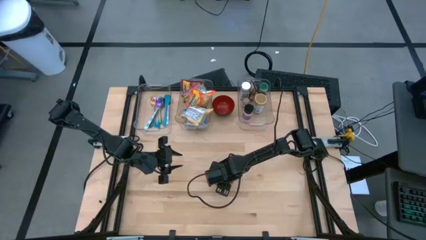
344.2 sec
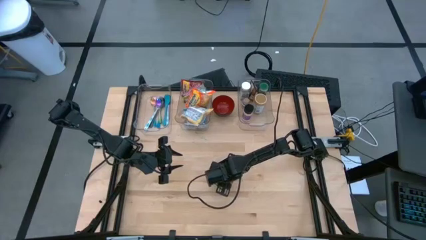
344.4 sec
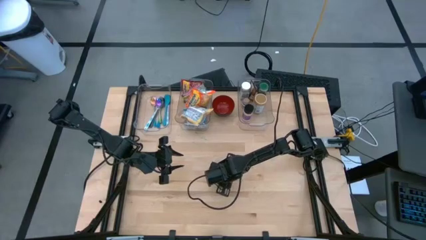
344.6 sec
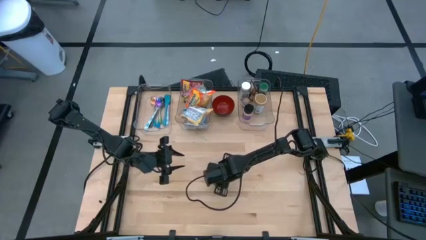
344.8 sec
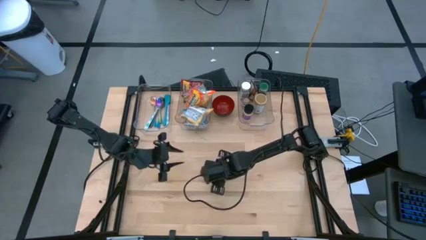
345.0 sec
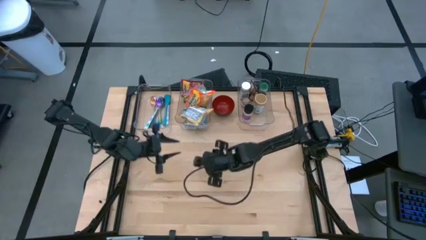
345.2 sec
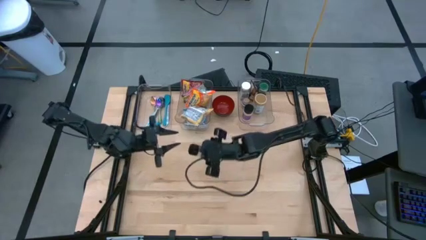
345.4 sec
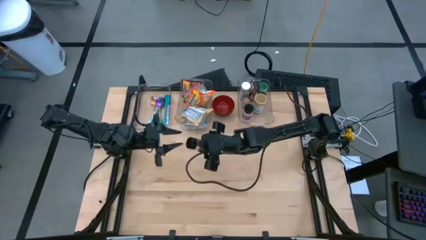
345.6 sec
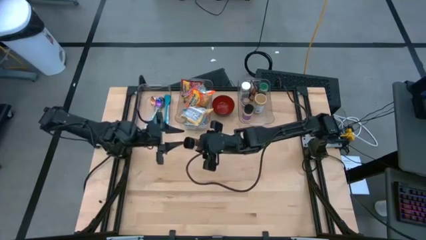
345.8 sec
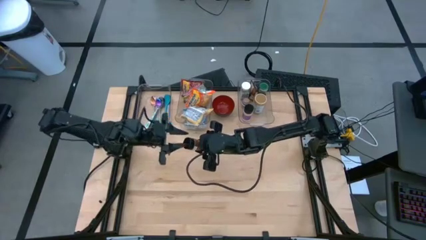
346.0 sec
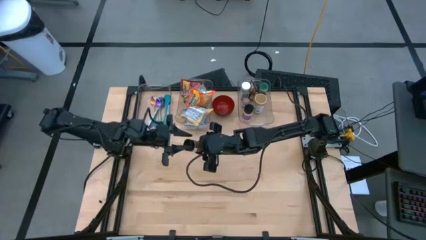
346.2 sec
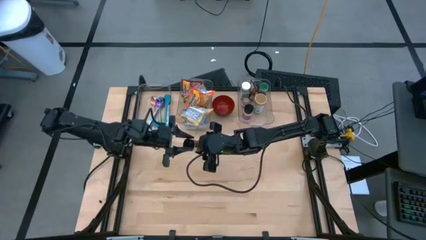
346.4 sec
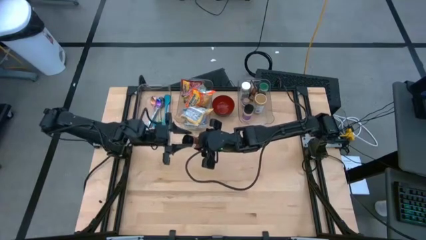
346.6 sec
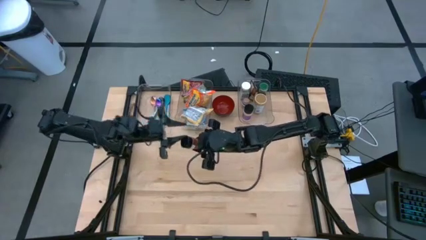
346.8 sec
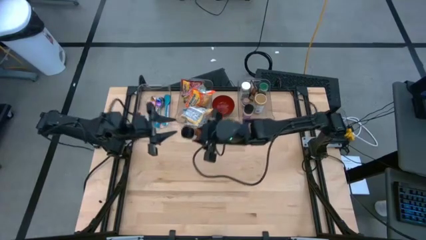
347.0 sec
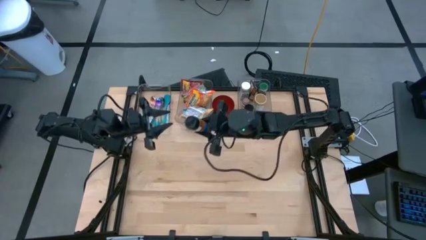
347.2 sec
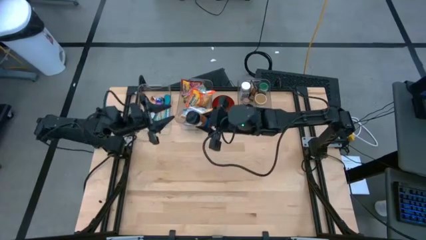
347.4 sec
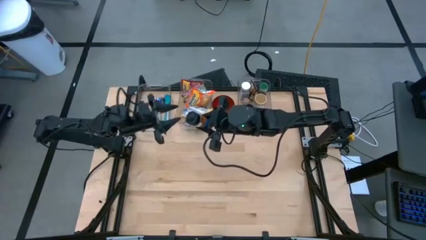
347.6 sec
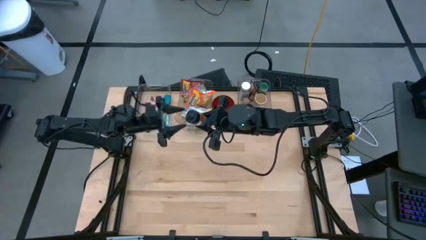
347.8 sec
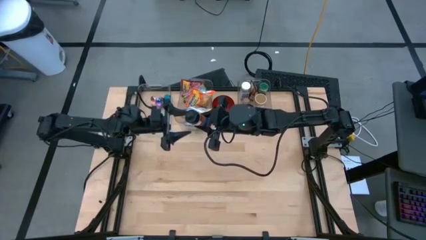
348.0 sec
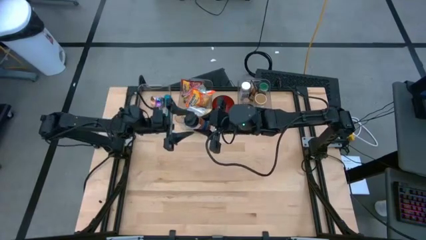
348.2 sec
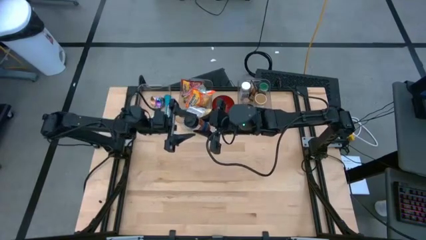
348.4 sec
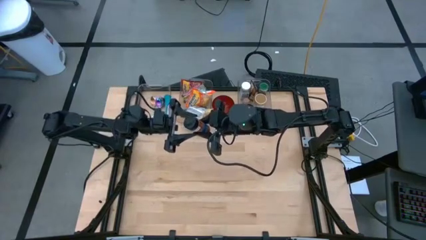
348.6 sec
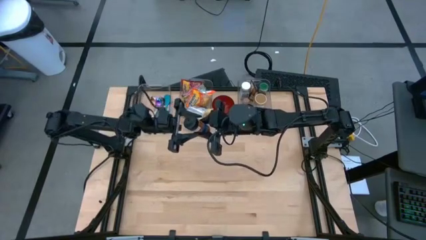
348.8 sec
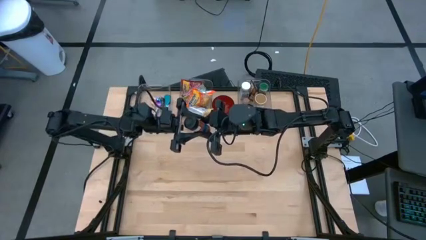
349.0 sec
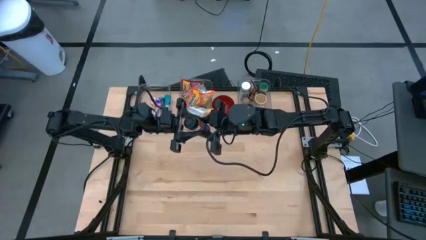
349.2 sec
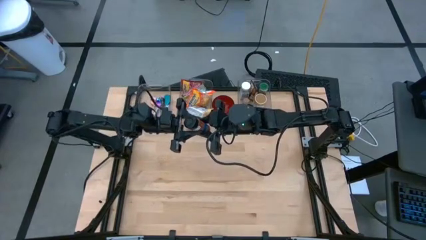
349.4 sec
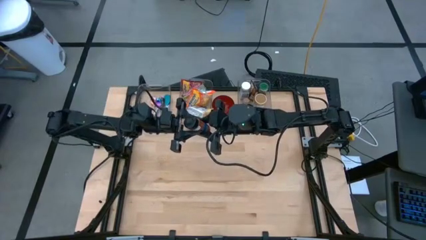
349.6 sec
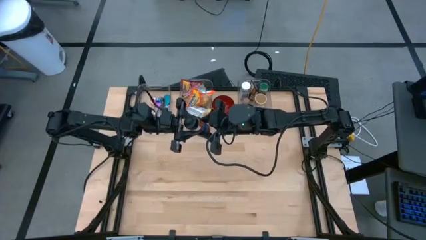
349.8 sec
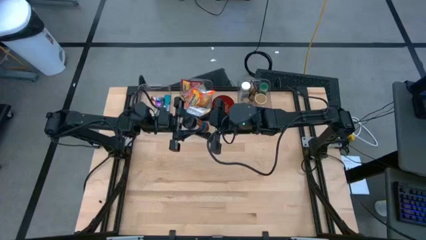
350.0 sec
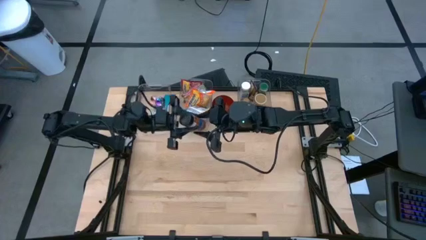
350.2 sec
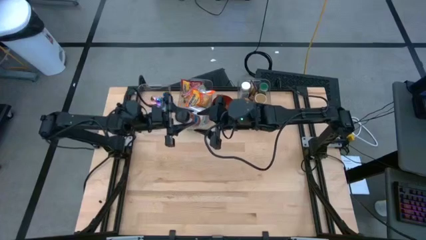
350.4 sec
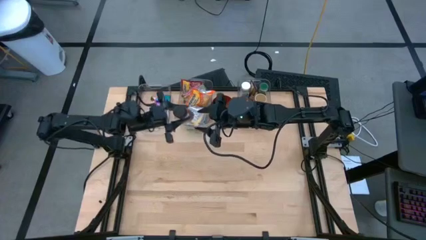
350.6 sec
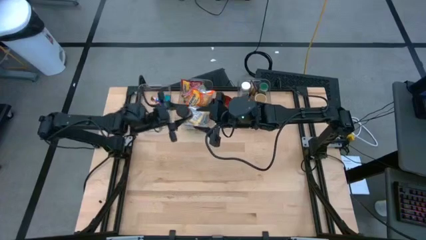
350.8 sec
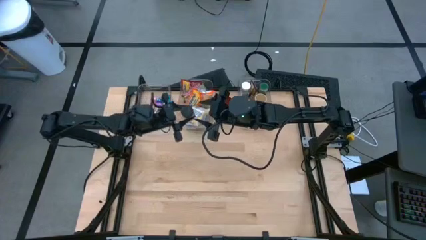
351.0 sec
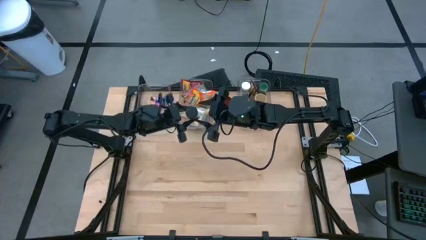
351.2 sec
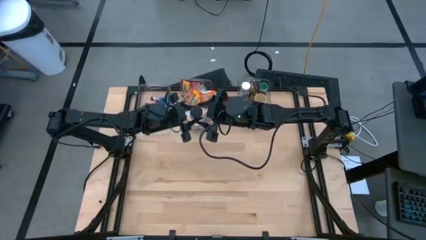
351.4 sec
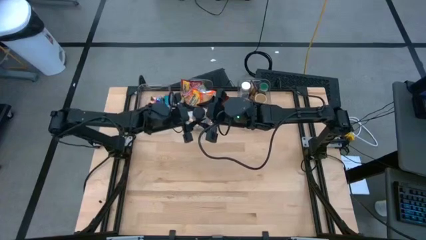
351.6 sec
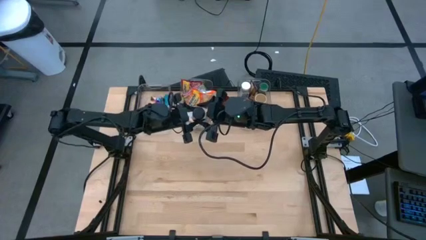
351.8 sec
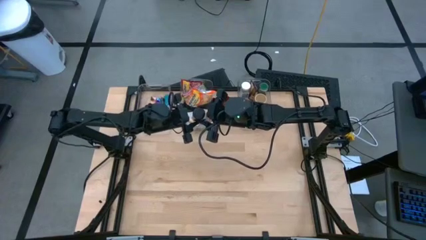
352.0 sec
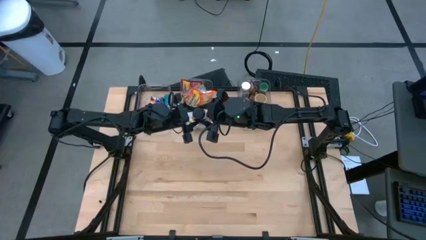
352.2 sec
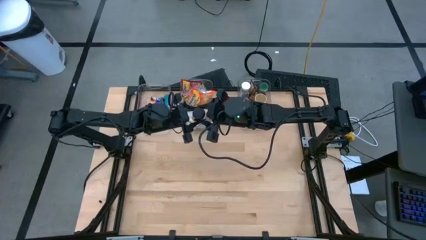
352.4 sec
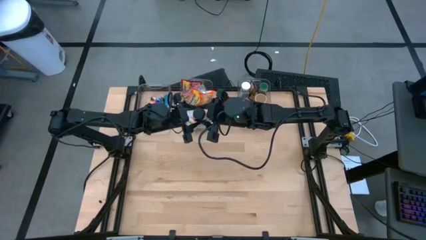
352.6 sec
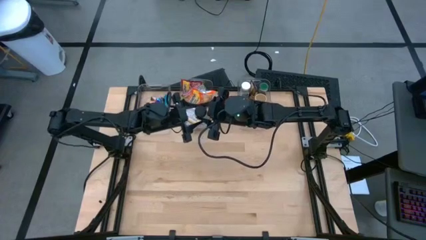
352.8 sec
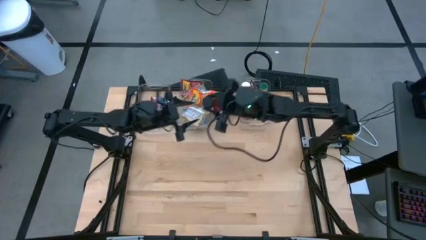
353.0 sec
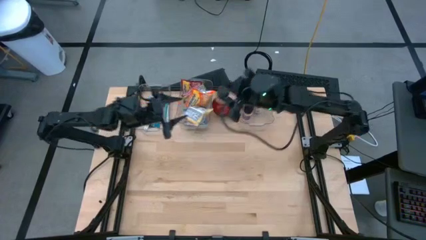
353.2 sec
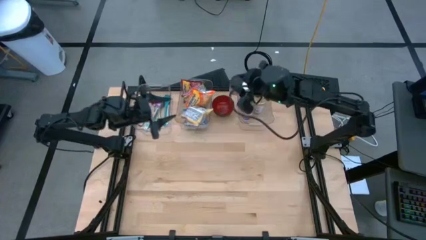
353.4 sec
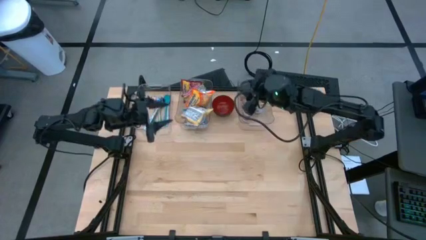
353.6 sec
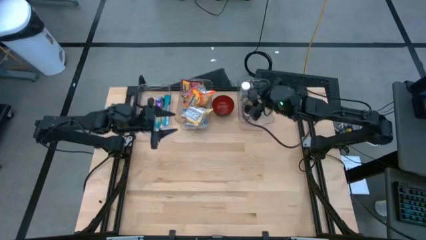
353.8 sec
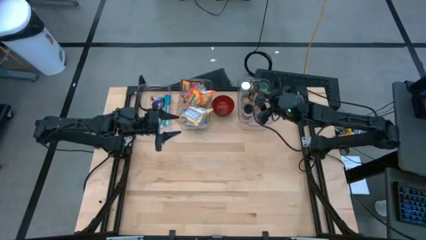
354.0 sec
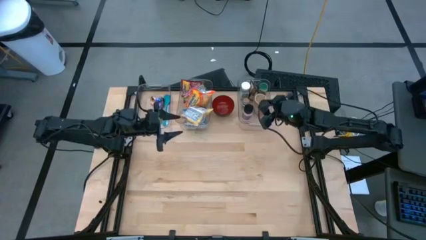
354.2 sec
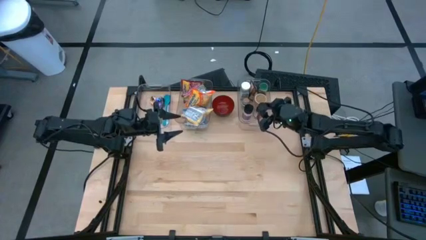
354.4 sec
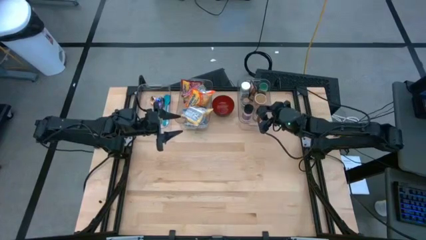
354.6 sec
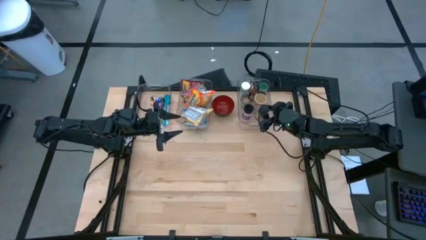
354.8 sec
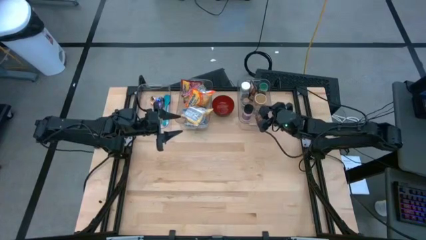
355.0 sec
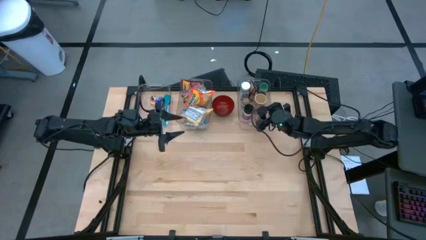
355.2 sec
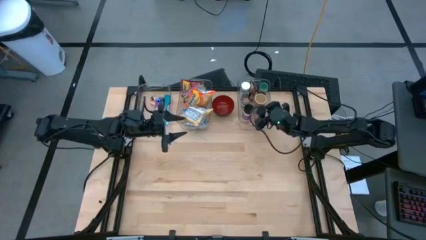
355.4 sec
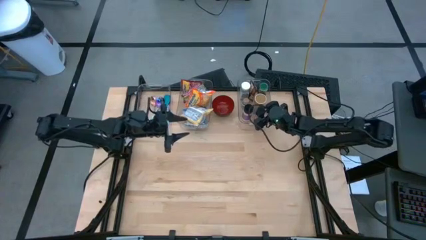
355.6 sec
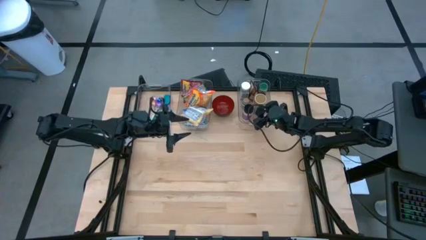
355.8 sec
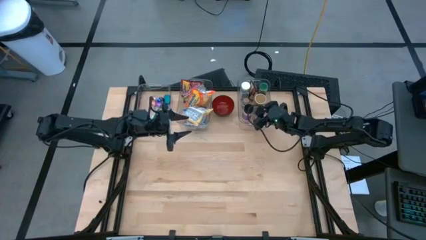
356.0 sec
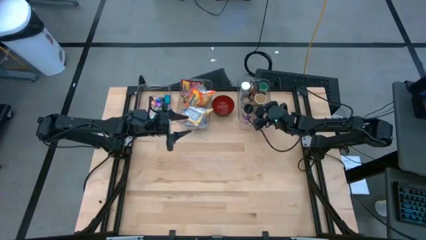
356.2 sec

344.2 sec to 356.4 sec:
Task: Pick & Place Food Item
Put the orange seasoning bottle into the right transparent bin

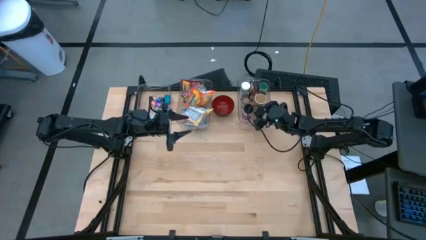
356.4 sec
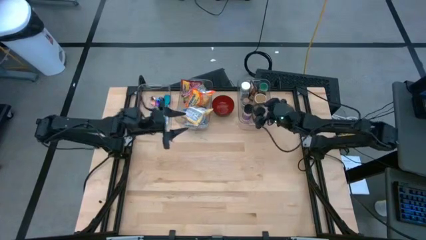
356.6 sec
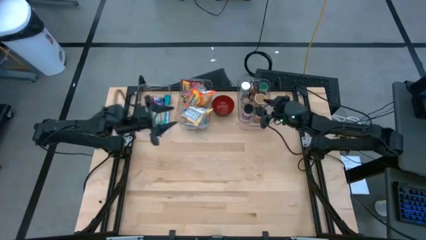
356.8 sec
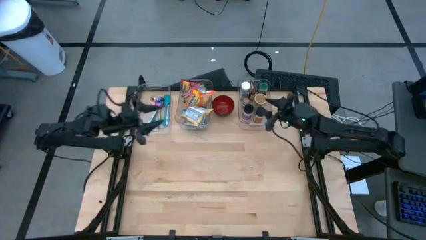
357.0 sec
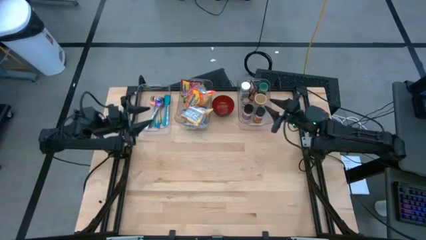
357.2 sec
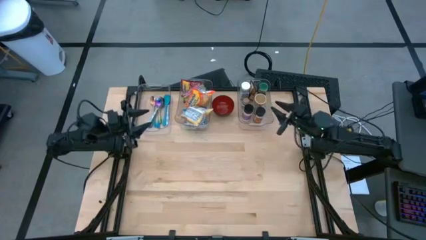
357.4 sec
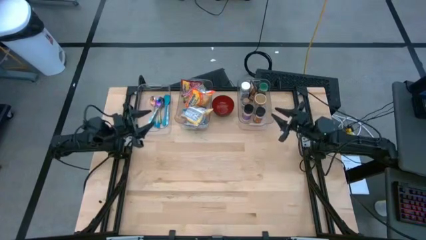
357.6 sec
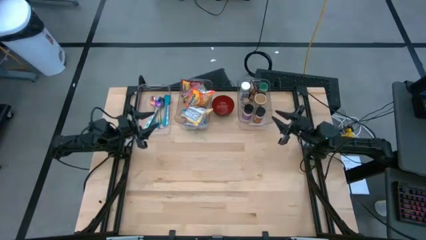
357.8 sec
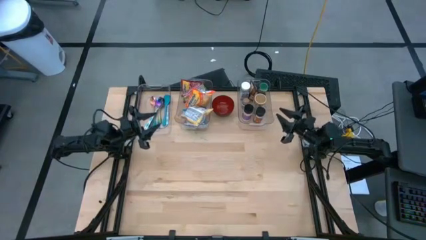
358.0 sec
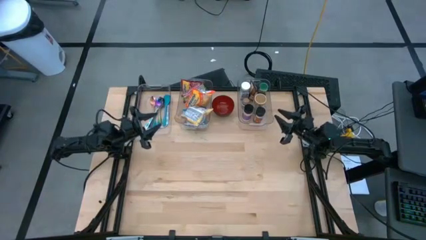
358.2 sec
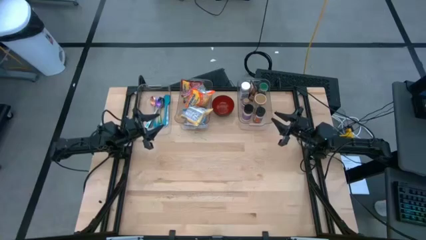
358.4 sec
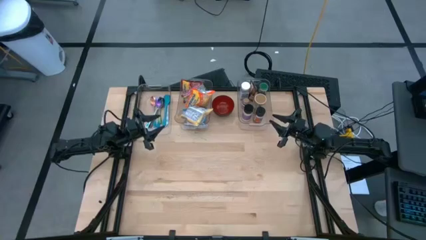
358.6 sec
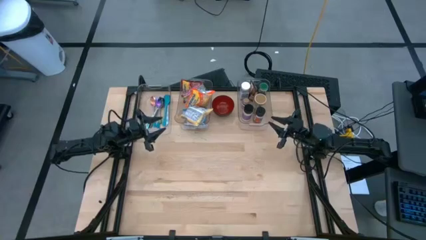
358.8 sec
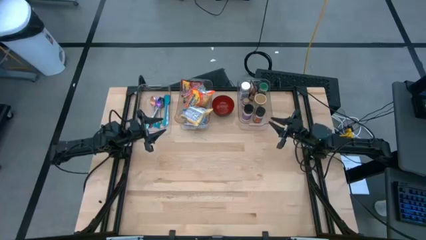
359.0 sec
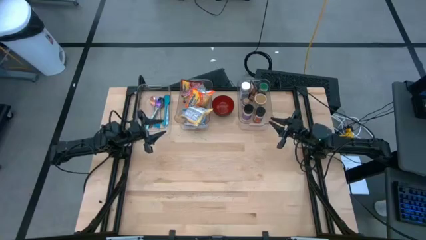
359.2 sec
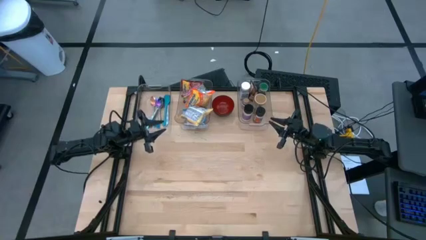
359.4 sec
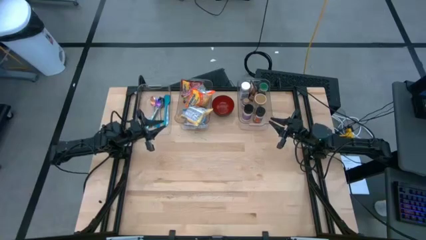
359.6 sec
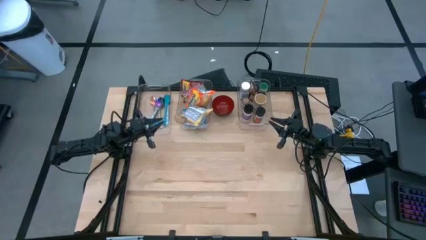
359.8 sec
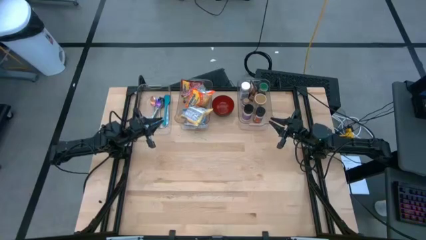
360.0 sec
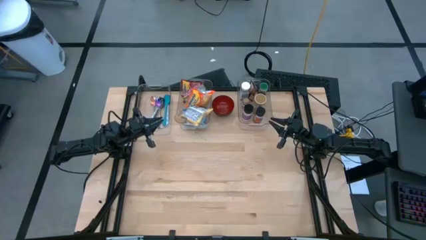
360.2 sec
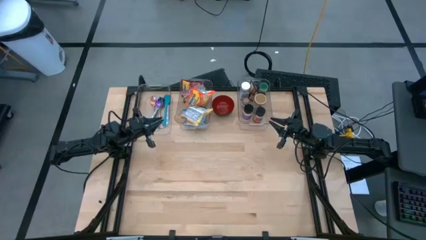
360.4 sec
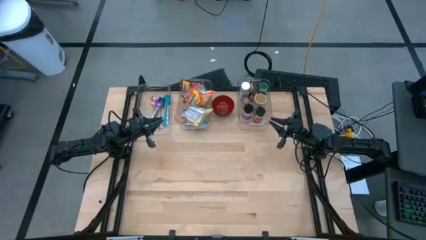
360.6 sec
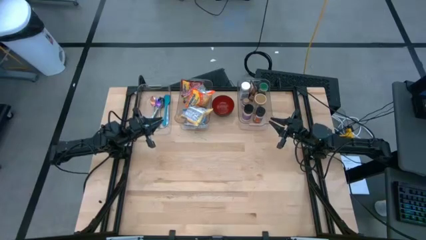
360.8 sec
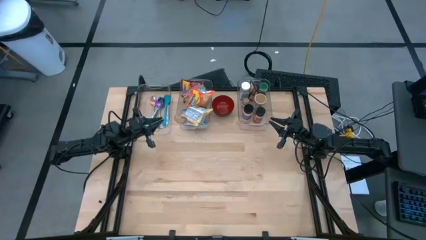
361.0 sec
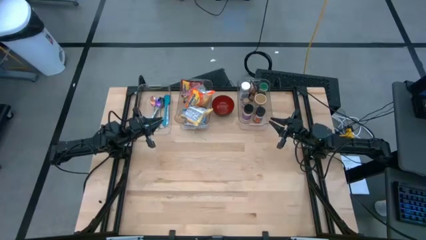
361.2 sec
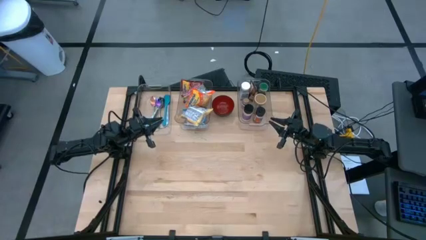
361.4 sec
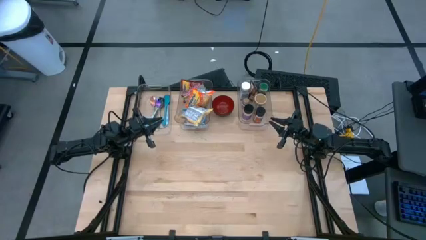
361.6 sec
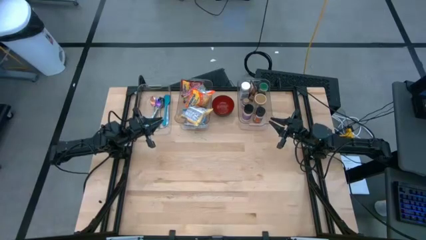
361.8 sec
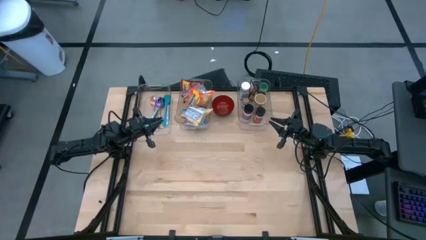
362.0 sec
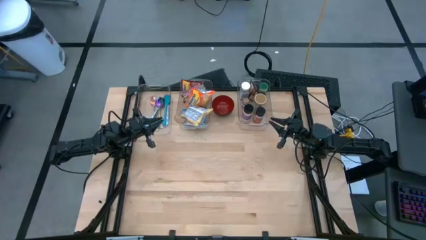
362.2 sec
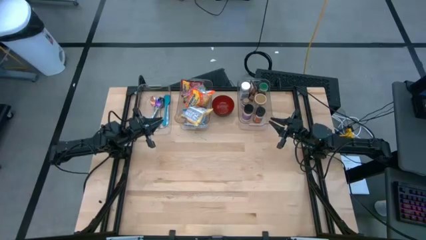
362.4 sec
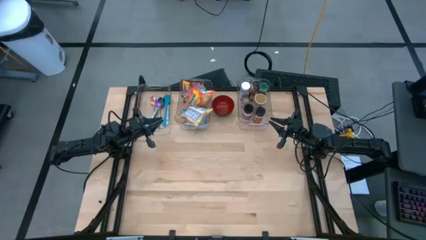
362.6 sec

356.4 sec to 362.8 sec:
Return to Home Position
